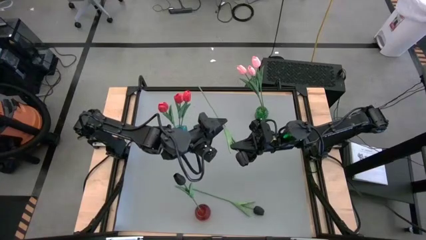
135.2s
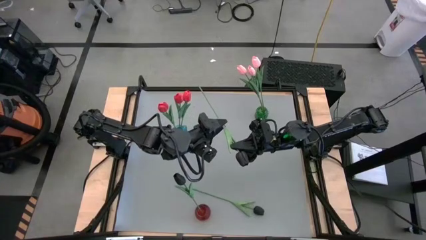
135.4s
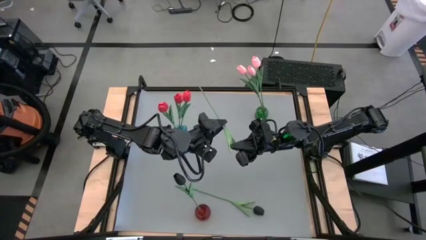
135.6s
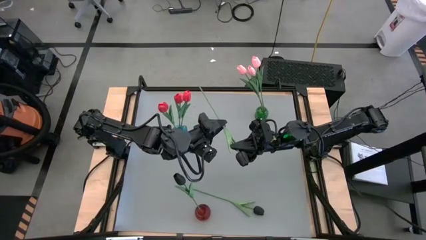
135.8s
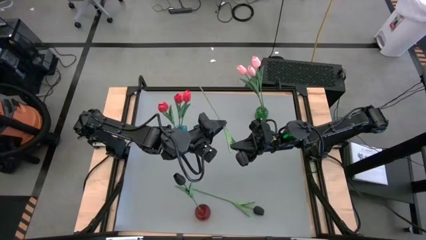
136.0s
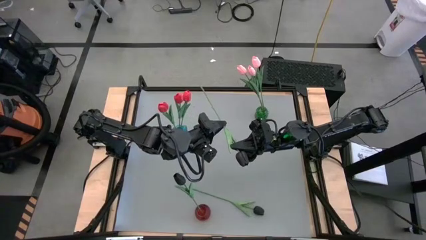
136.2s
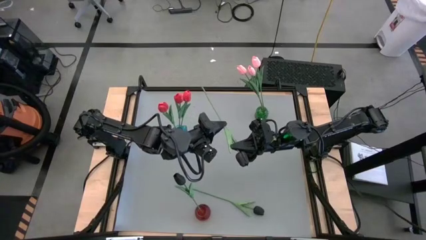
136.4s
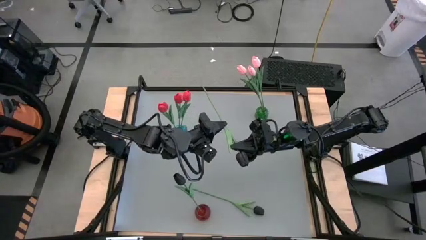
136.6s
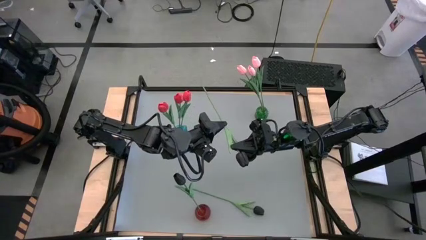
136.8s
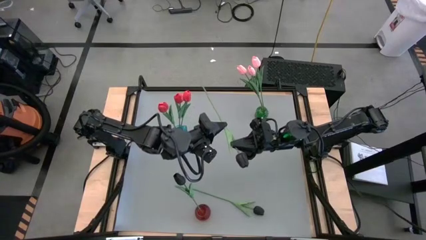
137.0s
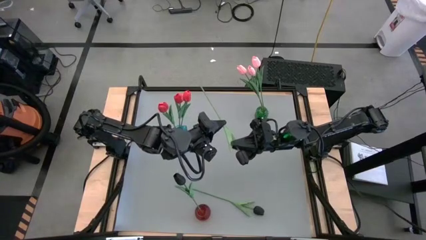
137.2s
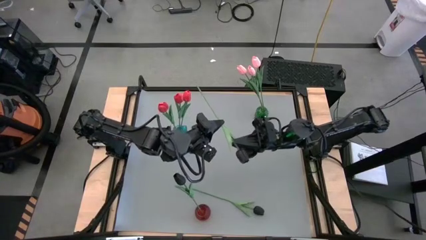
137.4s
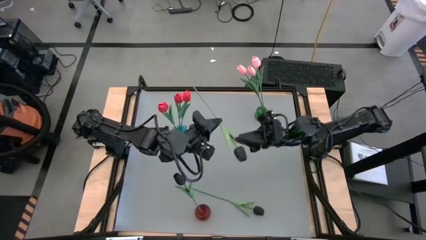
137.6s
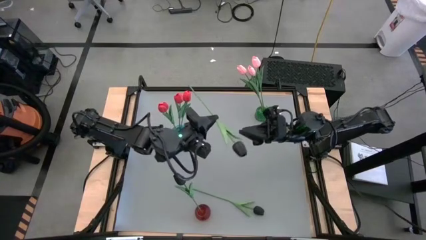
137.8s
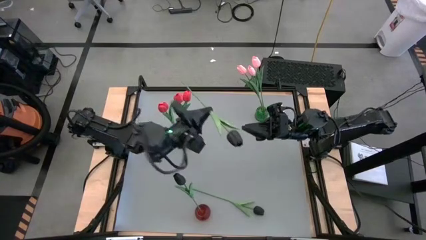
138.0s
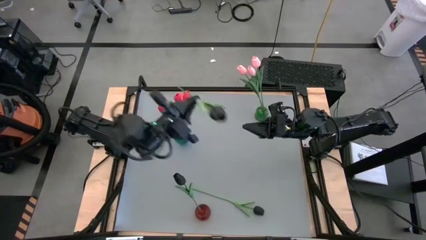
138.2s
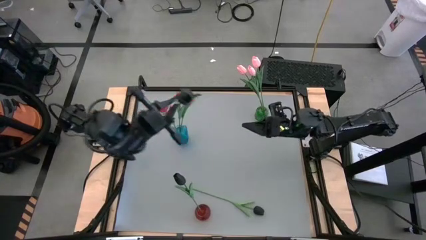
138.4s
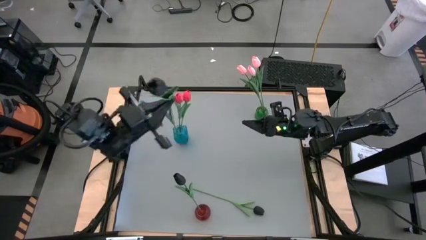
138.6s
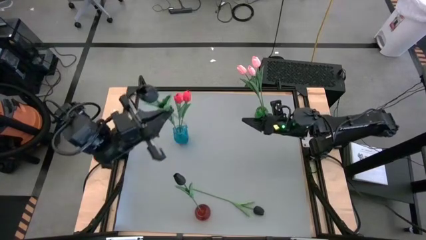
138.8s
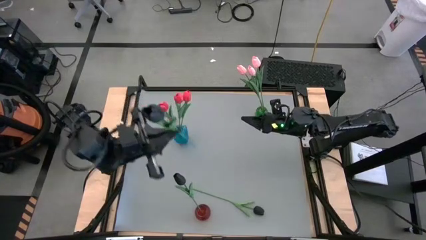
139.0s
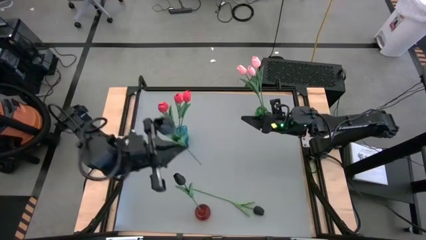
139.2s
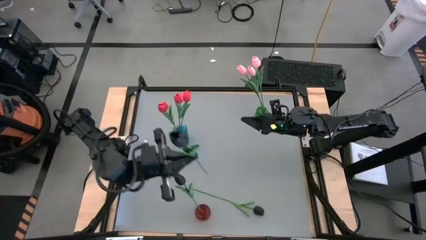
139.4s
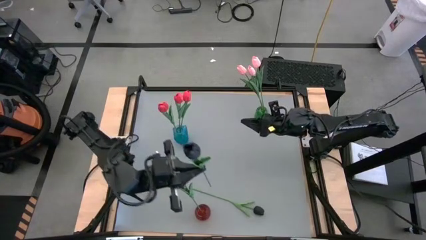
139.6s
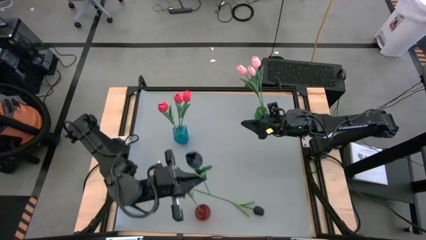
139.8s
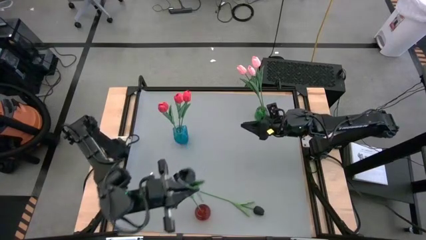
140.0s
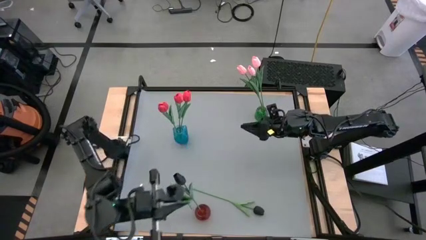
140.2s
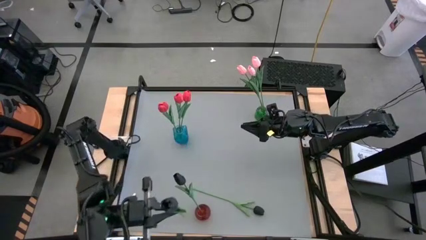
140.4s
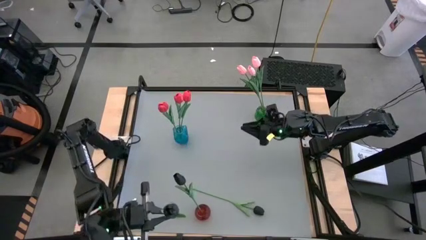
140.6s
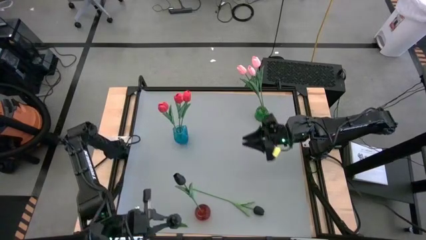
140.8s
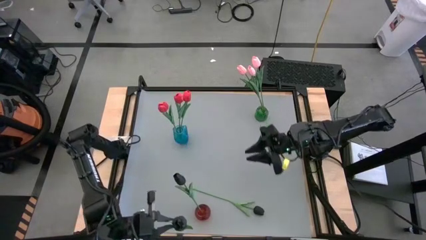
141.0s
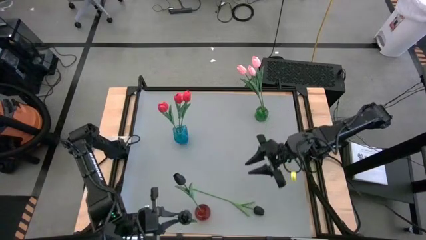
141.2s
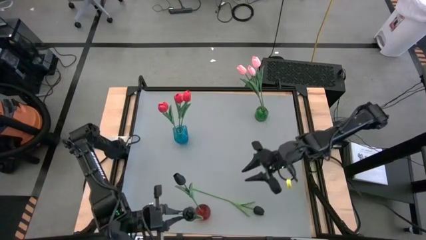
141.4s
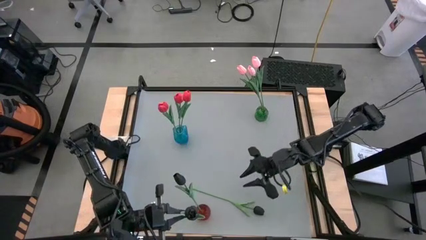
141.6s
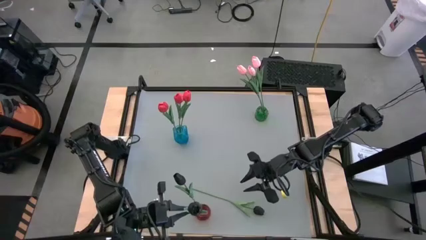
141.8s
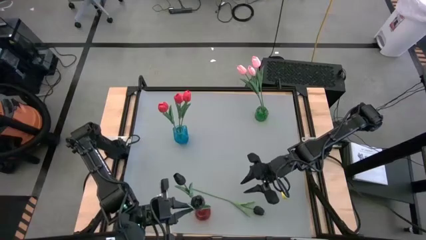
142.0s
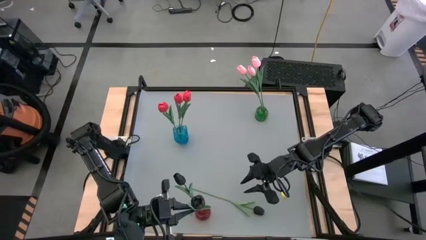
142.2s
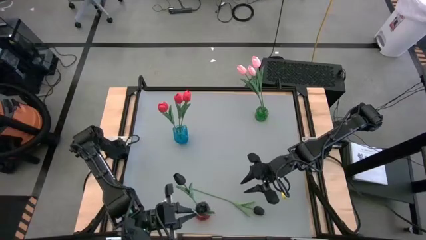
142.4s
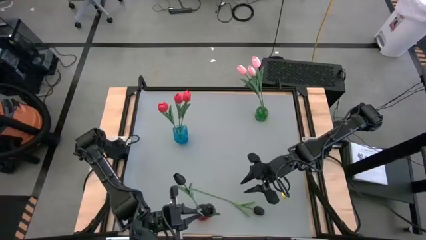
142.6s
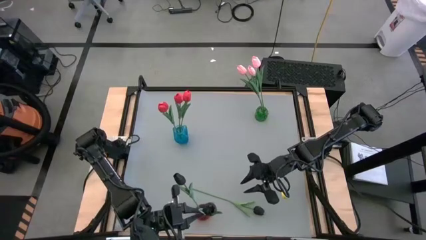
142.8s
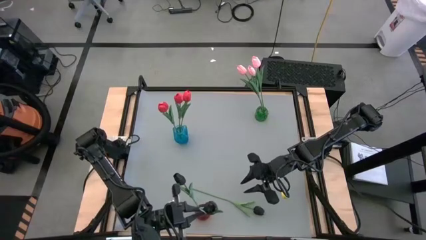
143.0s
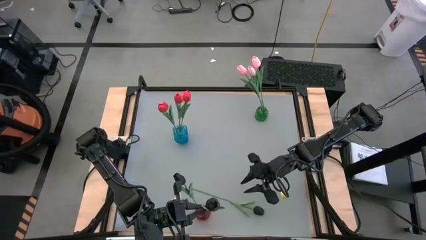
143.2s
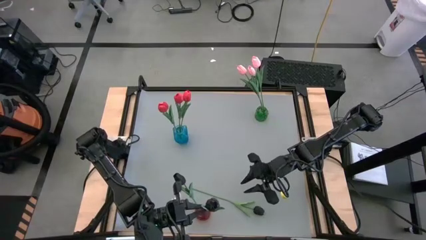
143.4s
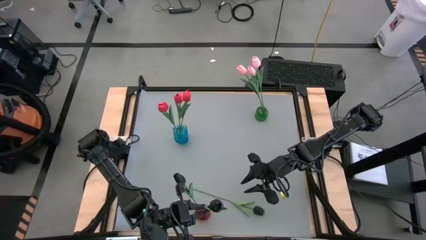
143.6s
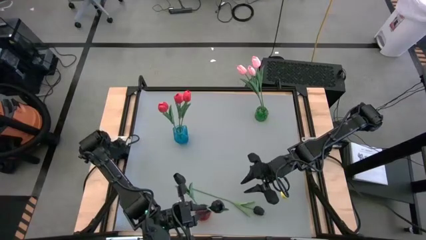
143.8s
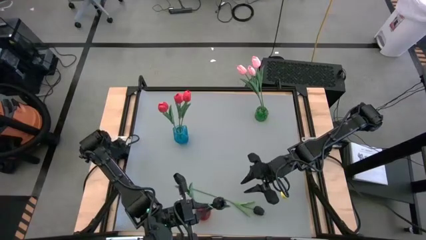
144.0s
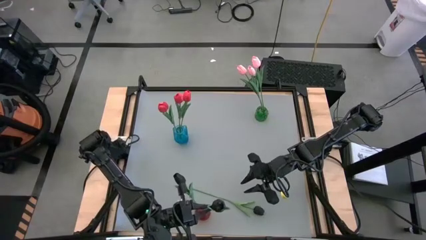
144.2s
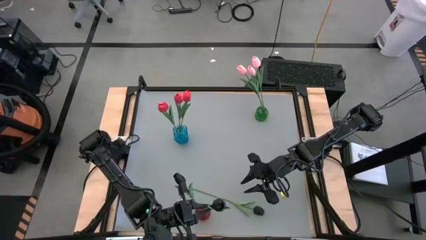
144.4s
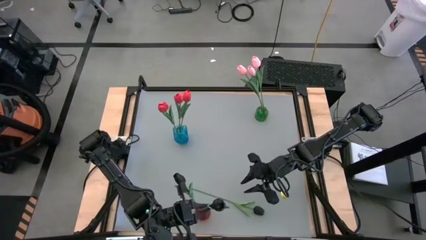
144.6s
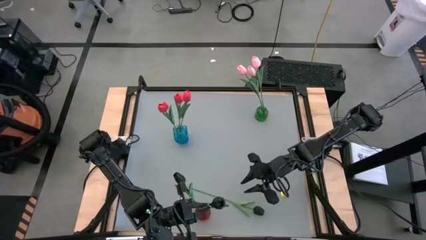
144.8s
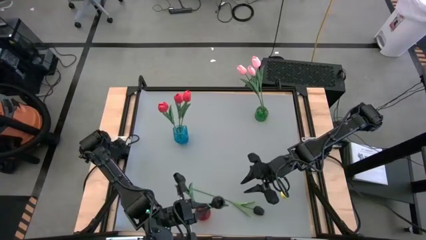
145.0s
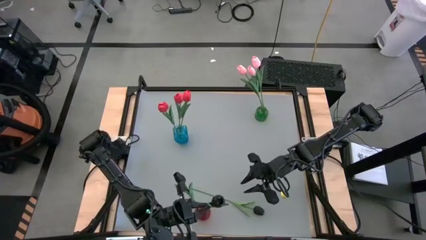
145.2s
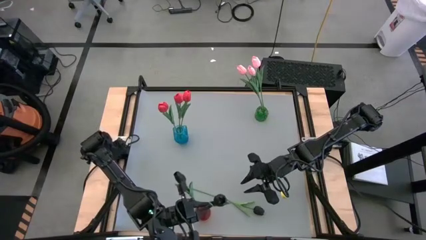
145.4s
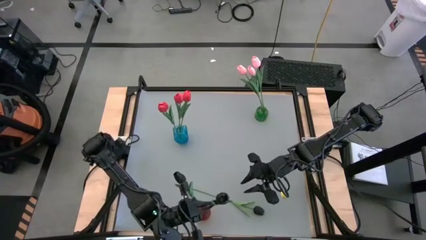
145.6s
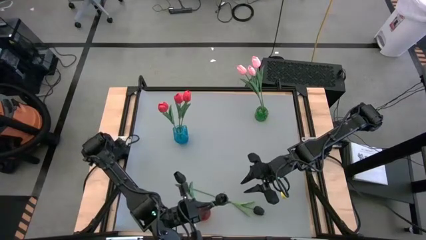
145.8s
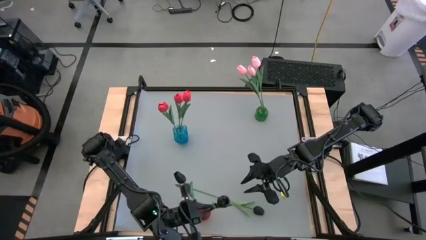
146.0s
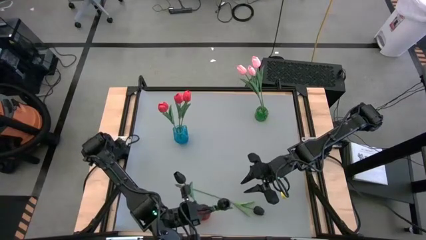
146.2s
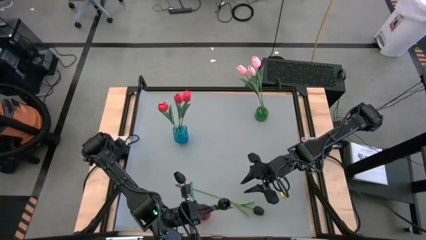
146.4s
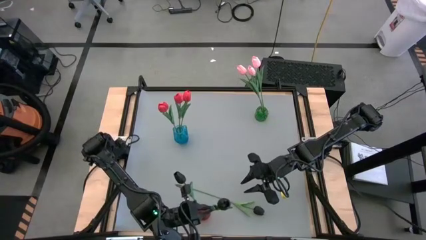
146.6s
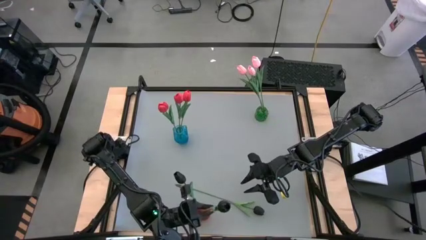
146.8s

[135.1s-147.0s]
Task: Sort flowers into vase by color
Put the top black flower into the red vase

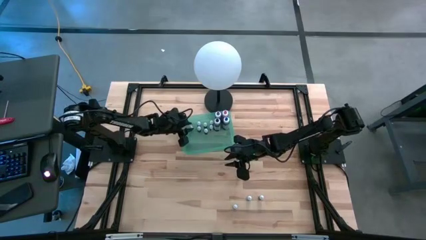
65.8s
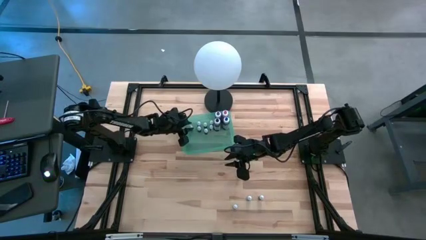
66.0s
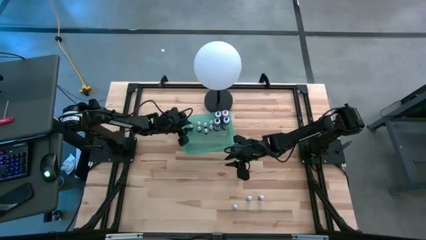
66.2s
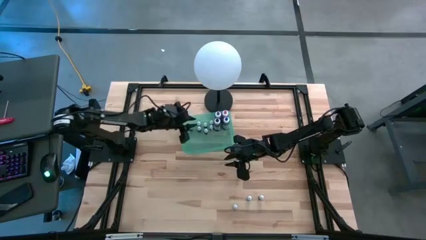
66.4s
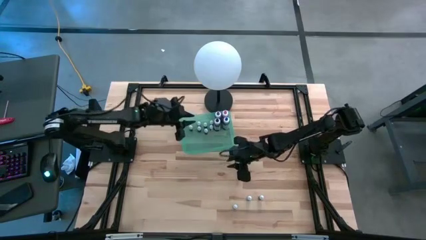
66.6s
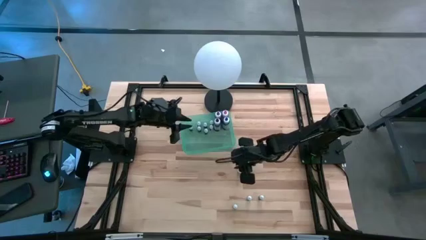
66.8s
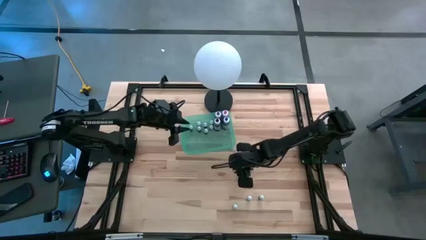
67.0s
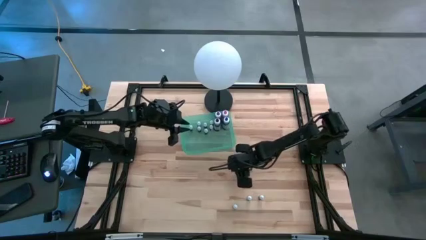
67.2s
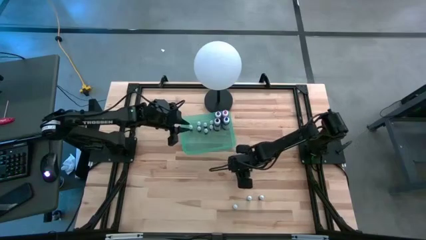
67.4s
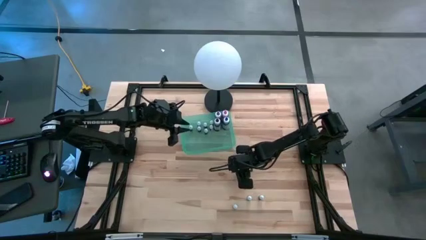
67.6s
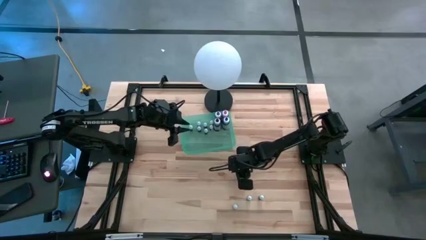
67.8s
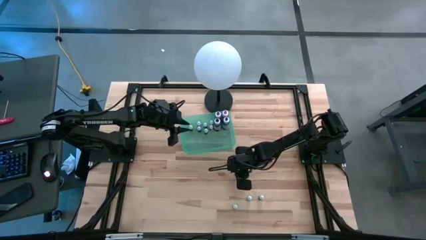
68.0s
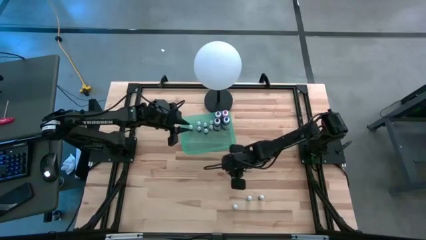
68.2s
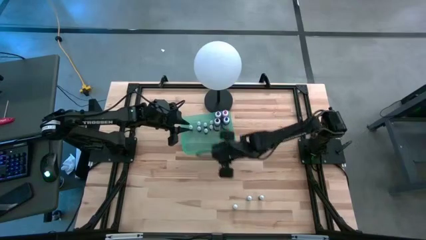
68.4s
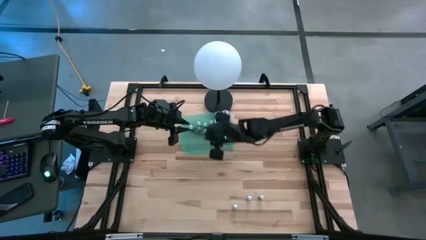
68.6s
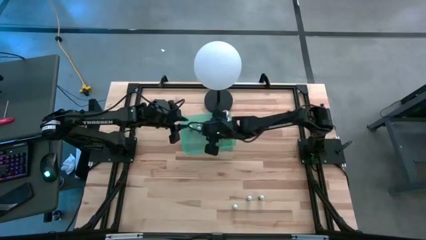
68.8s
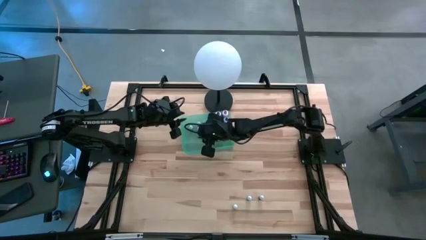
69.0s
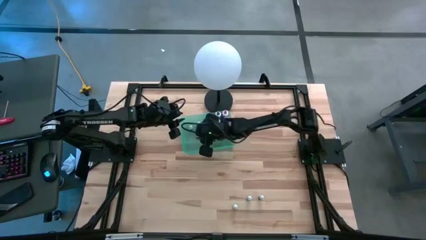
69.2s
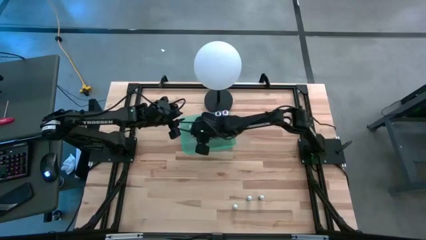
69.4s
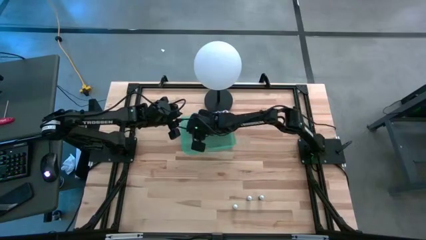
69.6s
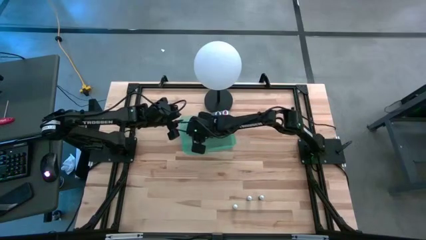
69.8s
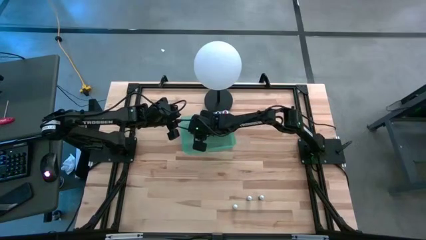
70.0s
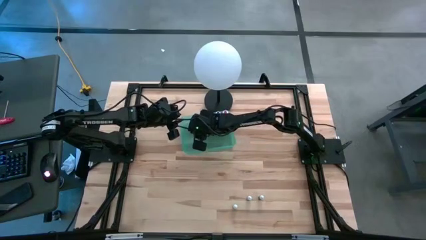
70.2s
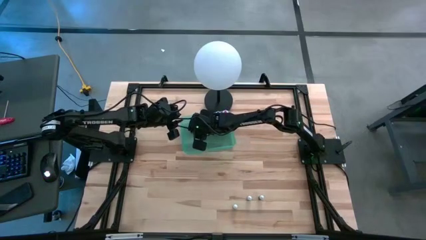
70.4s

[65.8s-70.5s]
Task: Pick & Place food coloring
Put the orange food coloring bottle into the green bin

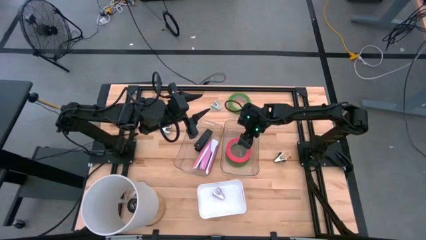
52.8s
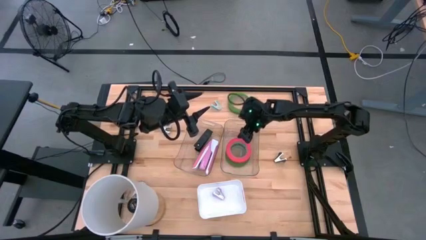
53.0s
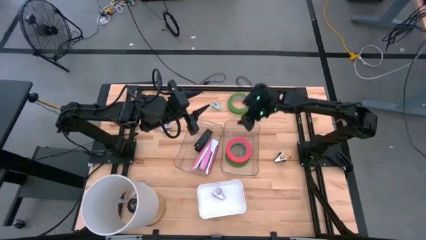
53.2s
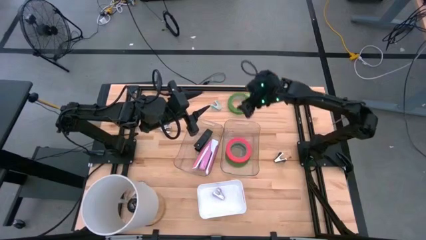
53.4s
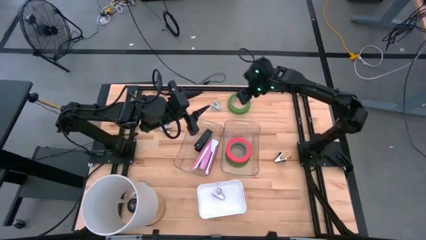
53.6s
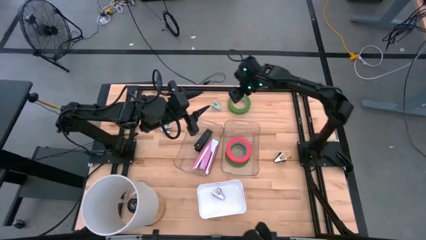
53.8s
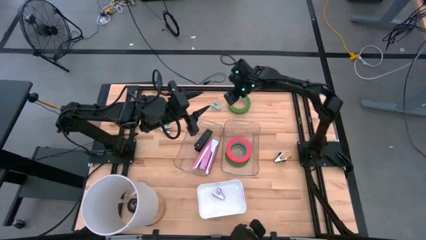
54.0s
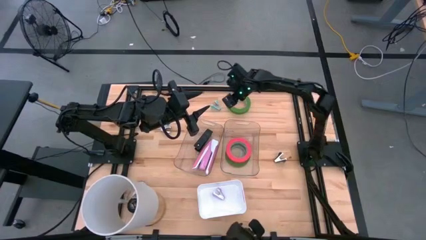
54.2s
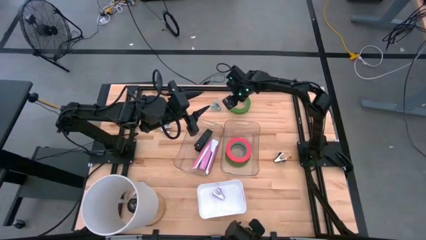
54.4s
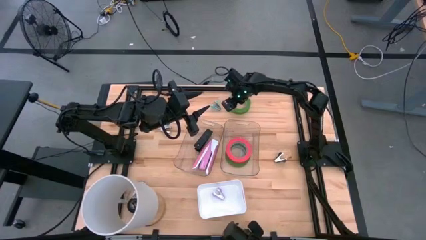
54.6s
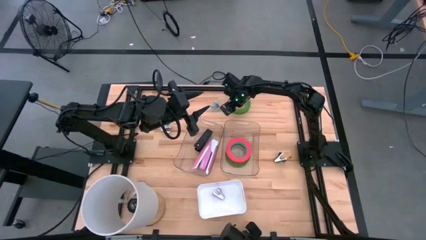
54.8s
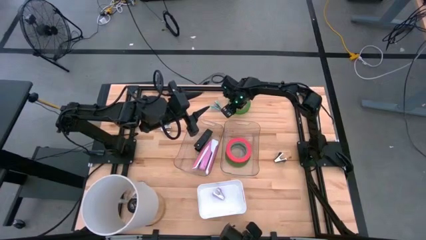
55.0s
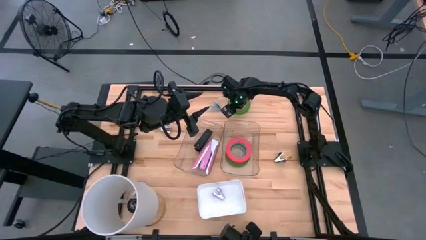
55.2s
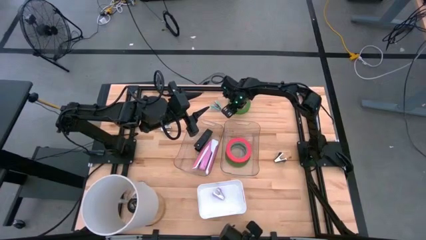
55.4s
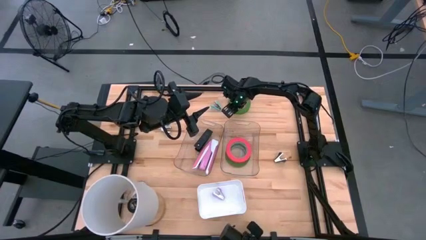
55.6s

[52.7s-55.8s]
Task: Pick and place Stapler, Stapler remover, tape
Put the green tape into the right transparent bin
